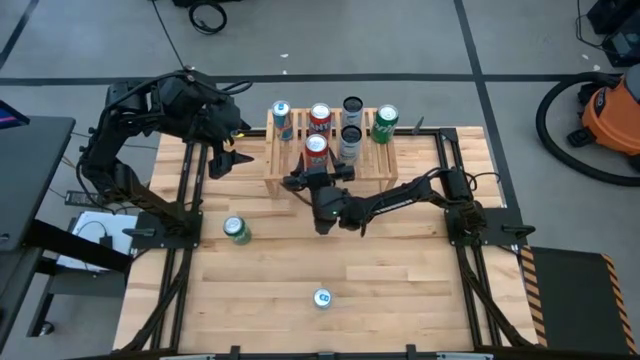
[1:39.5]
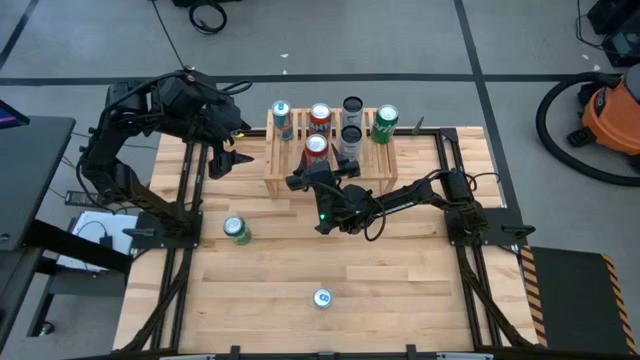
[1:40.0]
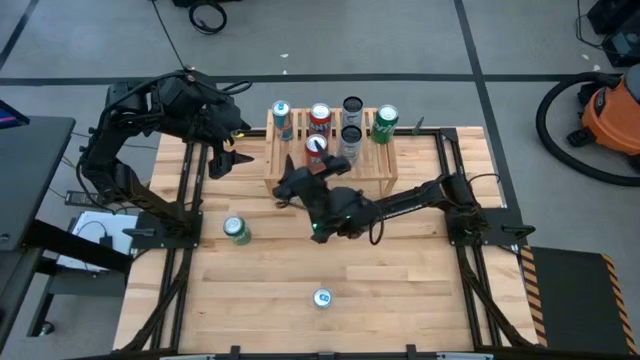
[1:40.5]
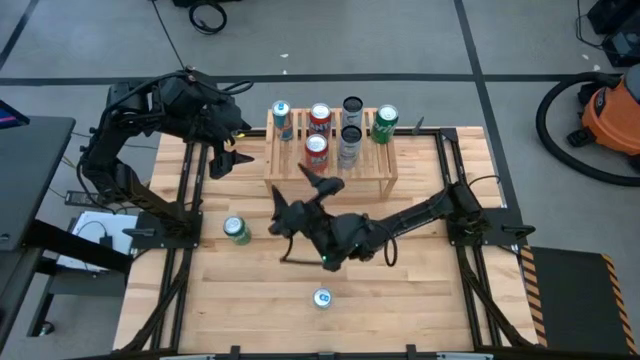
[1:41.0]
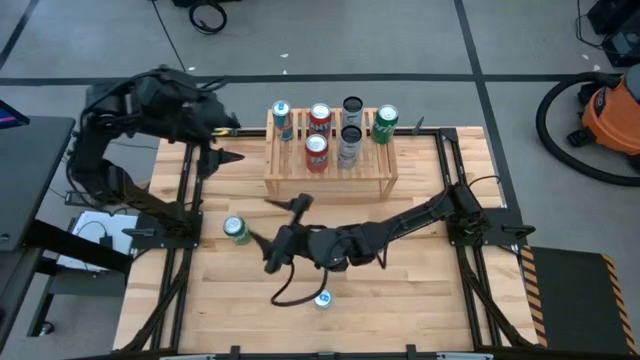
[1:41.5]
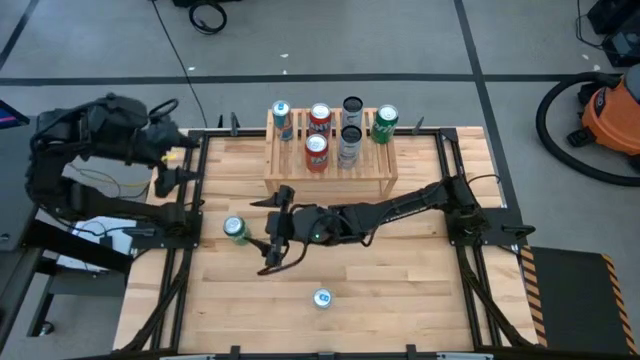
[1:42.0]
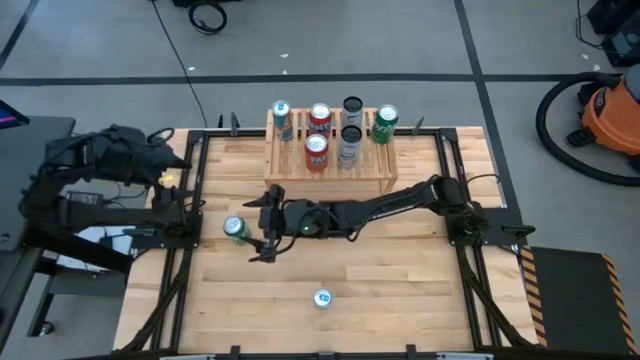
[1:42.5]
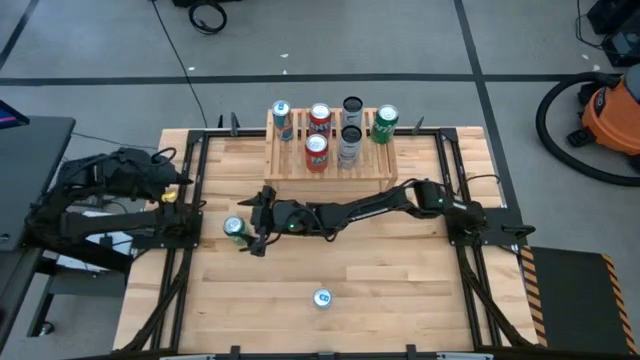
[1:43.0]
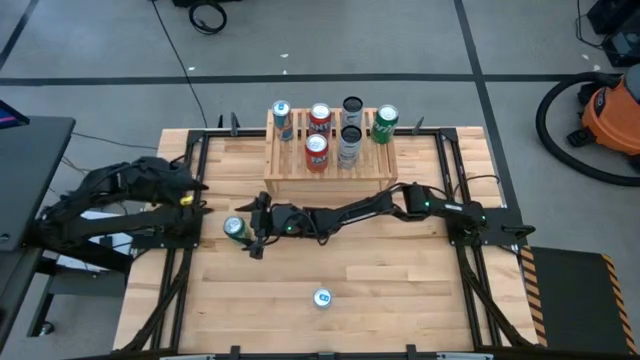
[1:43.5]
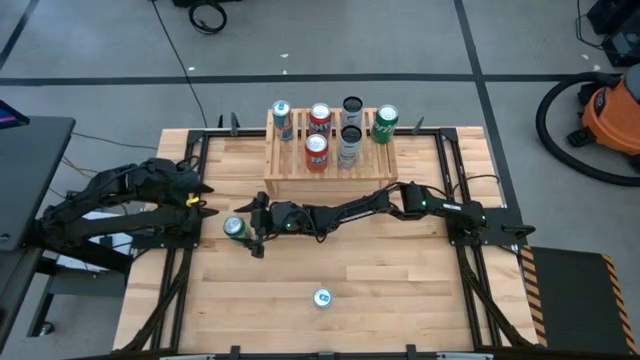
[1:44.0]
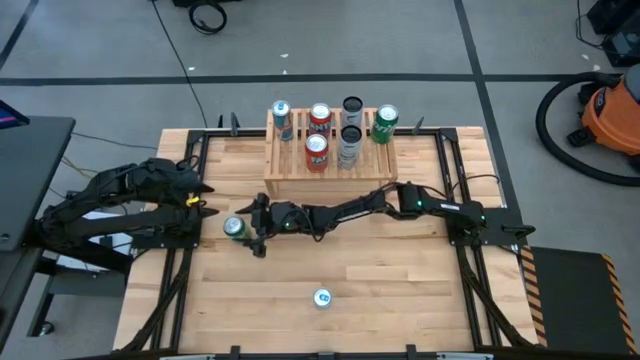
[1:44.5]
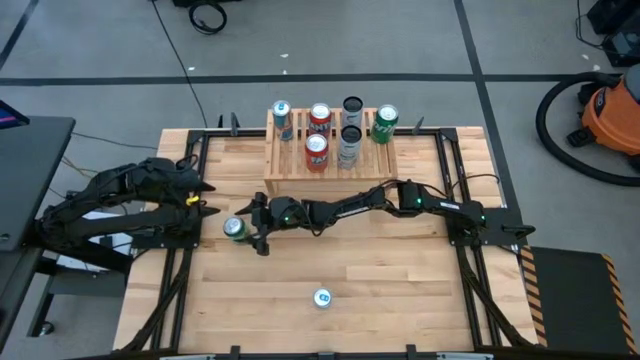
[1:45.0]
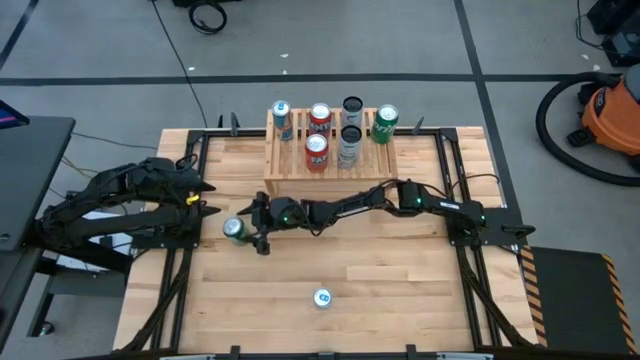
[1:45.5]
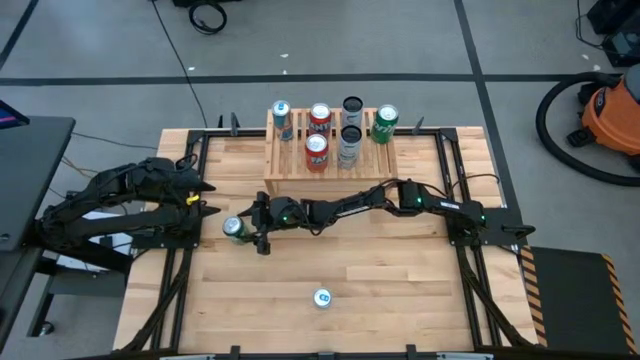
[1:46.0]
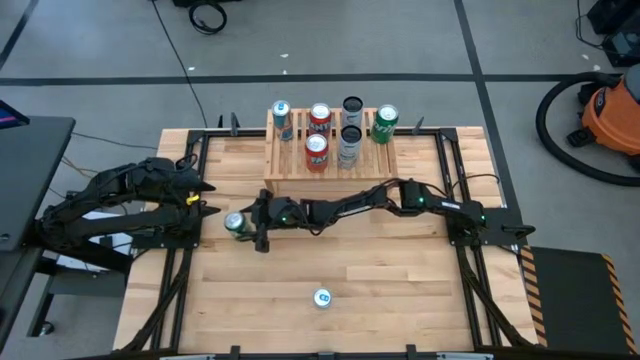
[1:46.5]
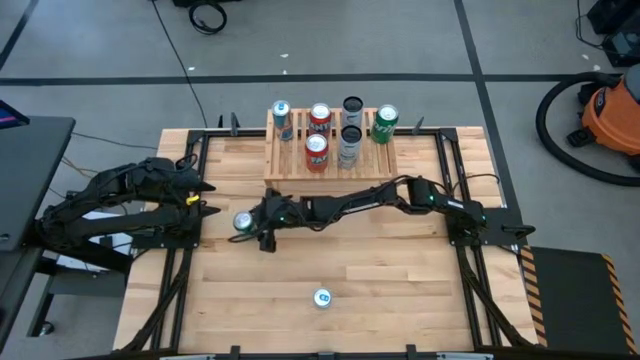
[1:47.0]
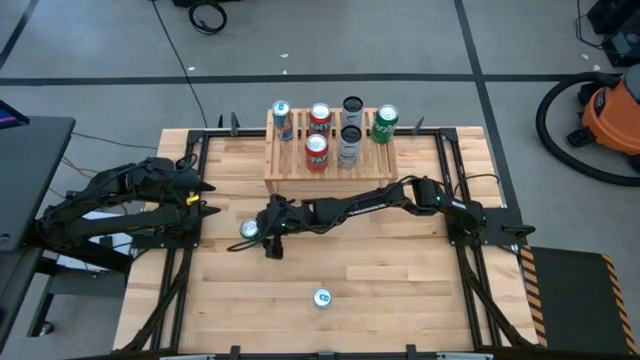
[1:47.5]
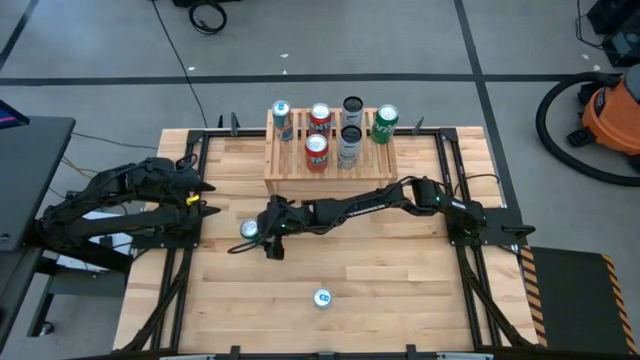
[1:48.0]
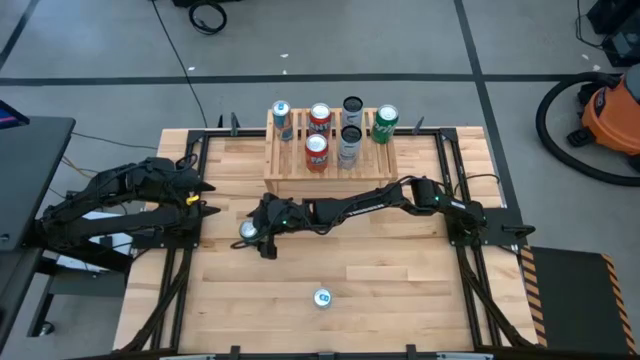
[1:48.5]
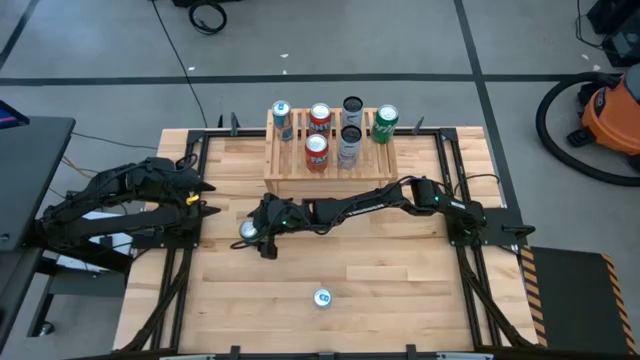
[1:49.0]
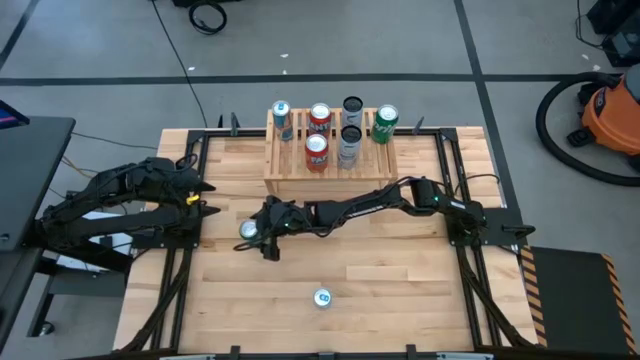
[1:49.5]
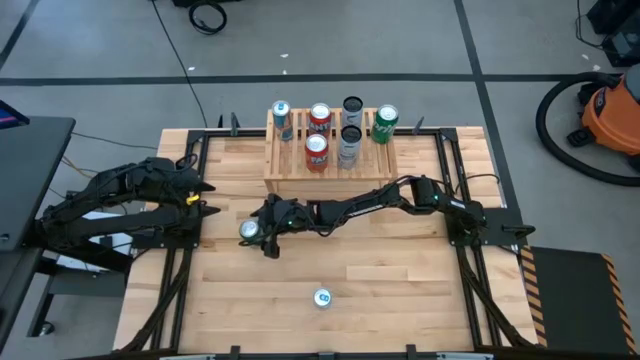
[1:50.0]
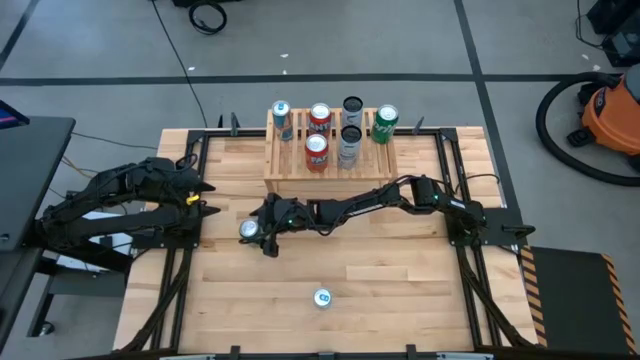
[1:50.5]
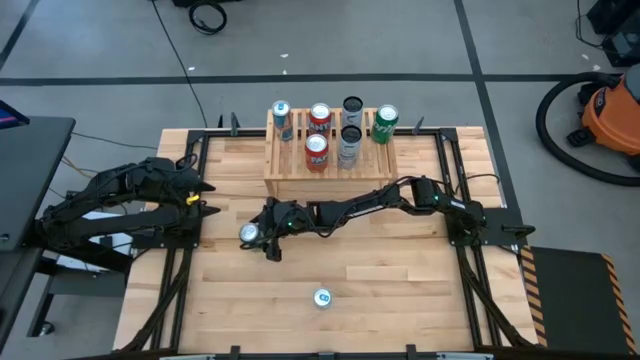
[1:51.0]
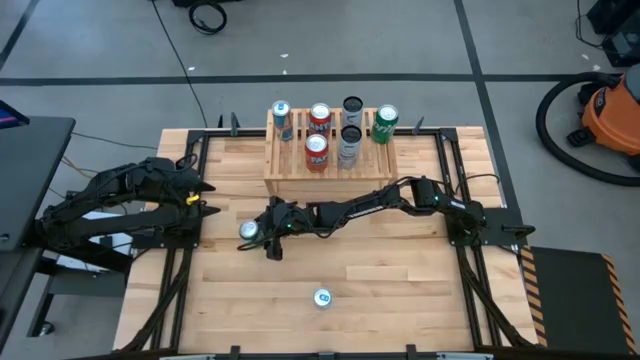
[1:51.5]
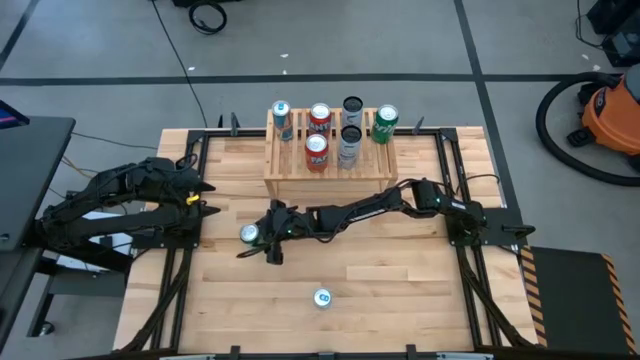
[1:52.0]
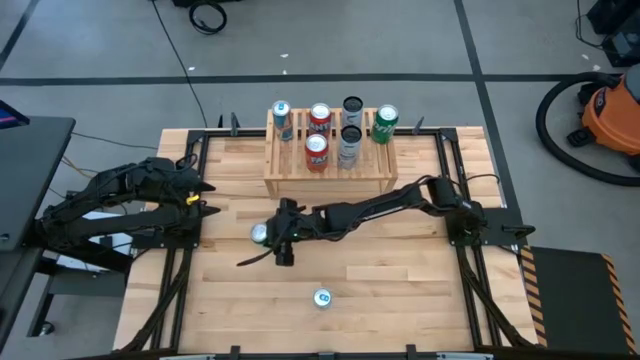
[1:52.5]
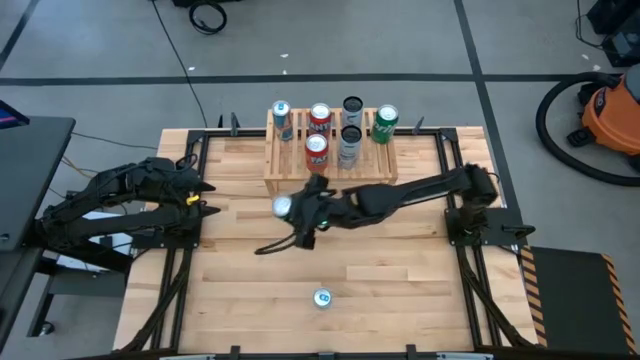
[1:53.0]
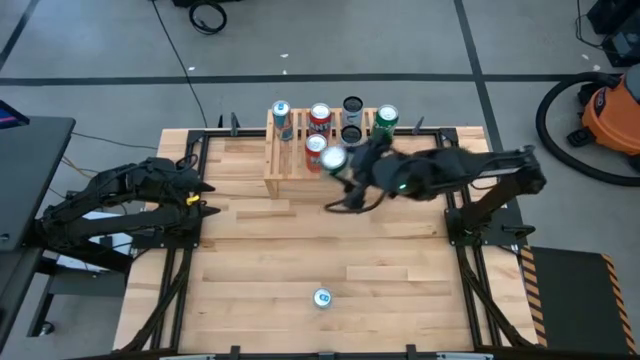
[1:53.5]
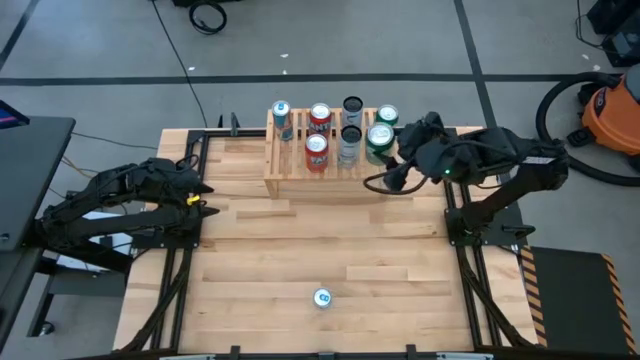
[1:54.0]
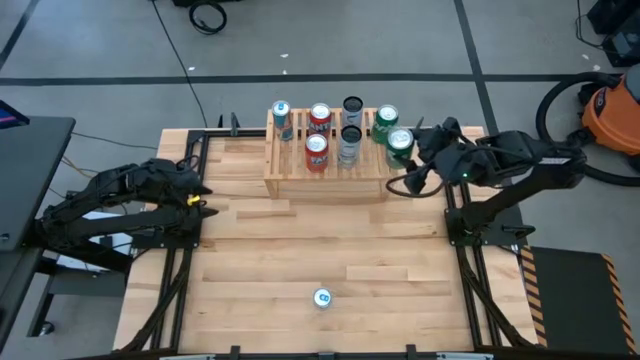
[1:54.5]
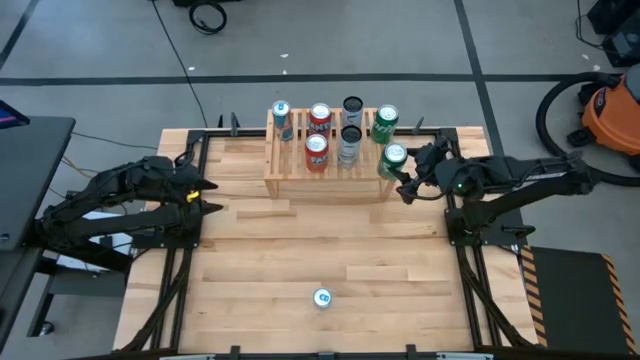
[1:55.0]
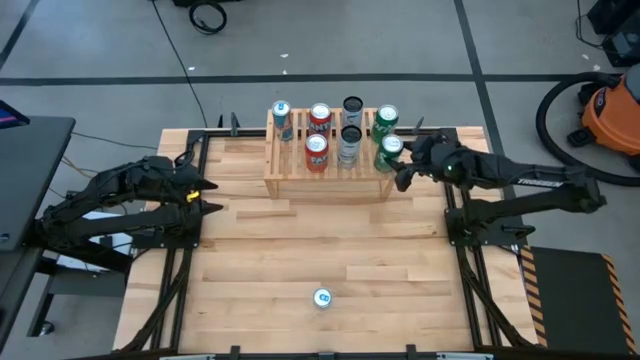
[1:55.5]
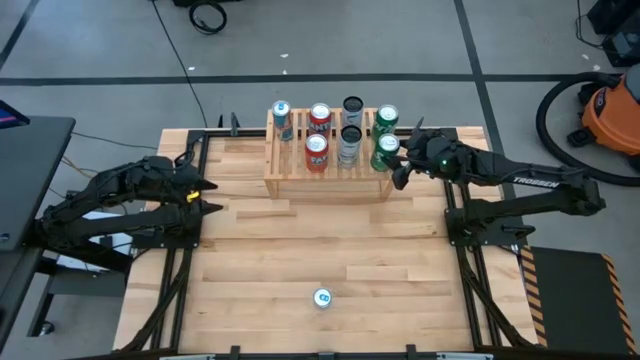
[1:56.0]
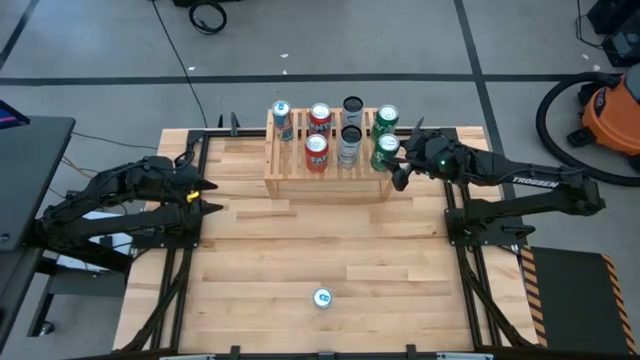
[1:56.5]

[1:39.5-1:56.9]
Task: Place canned beverage on shelf
Put the green soda can on the shelf aligned with the other green soda can

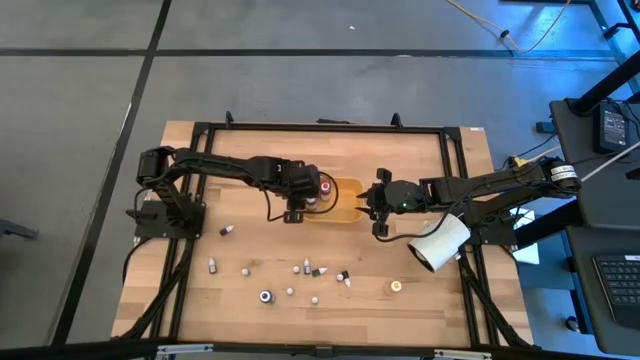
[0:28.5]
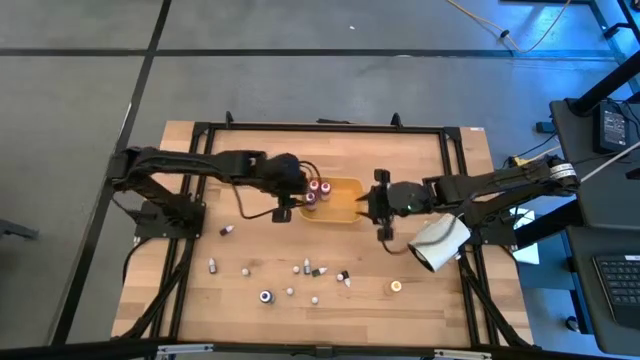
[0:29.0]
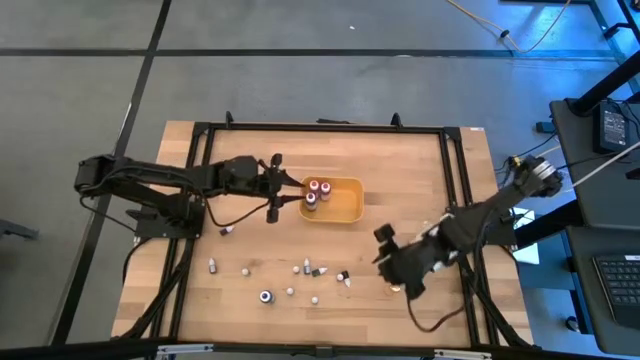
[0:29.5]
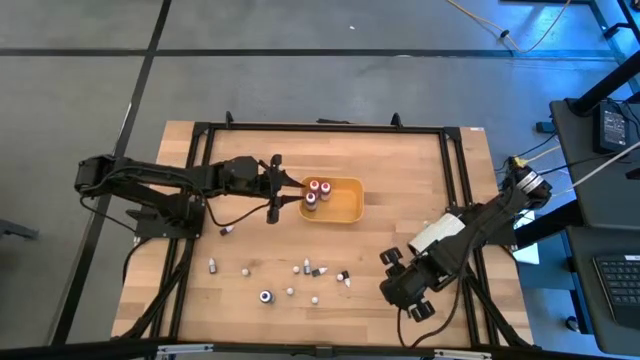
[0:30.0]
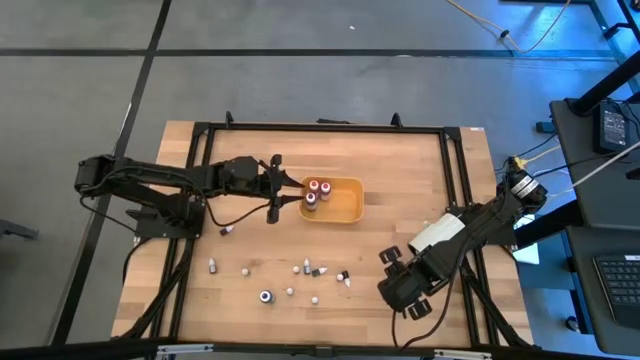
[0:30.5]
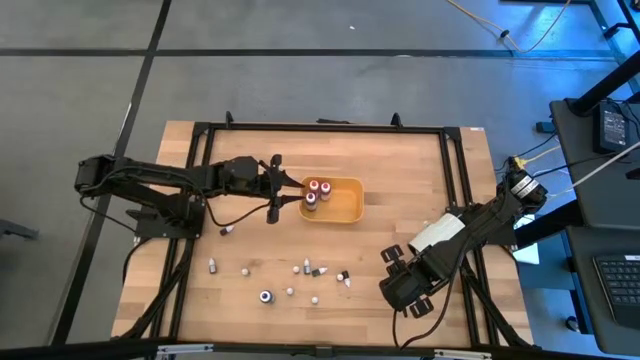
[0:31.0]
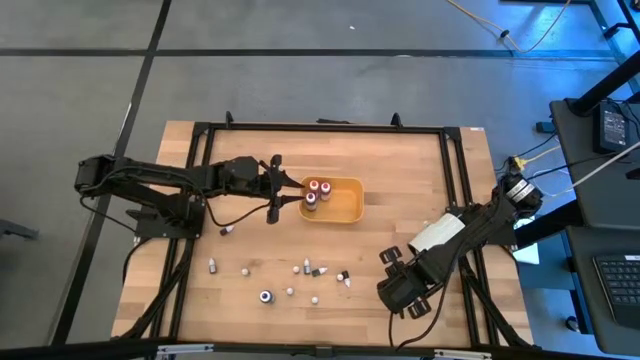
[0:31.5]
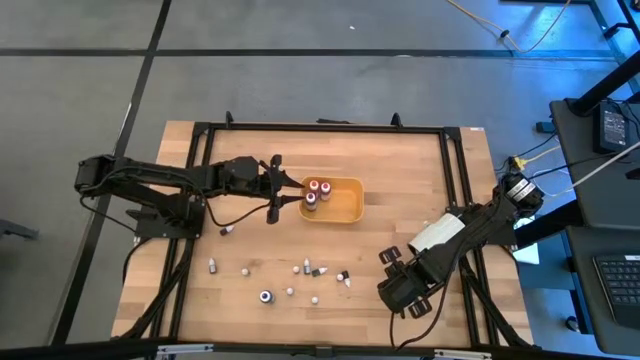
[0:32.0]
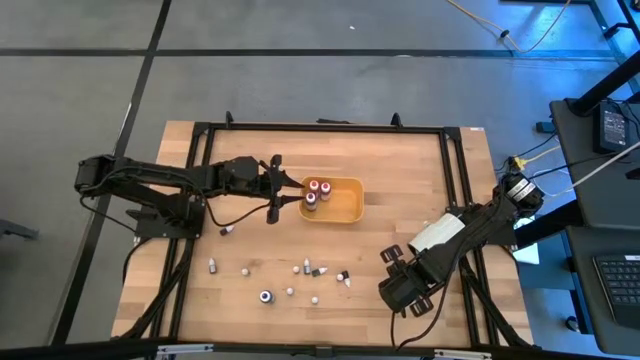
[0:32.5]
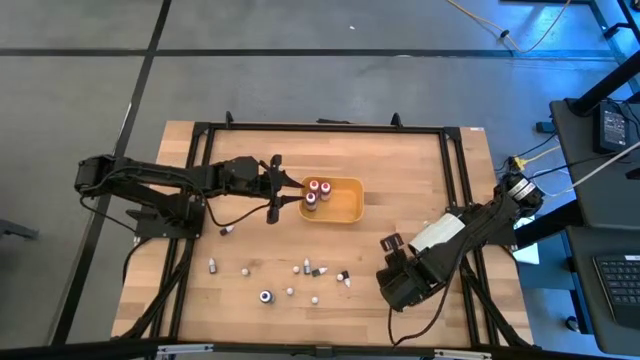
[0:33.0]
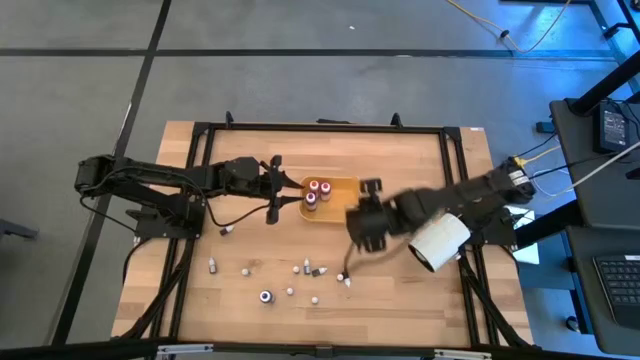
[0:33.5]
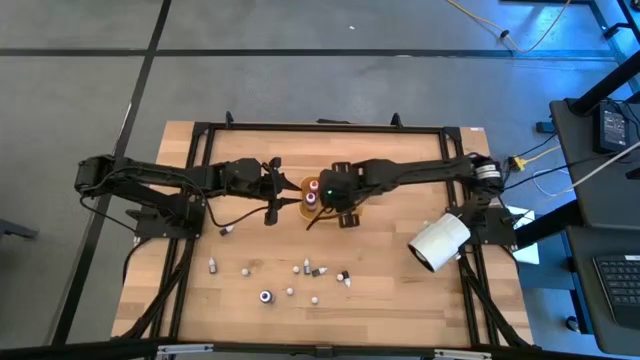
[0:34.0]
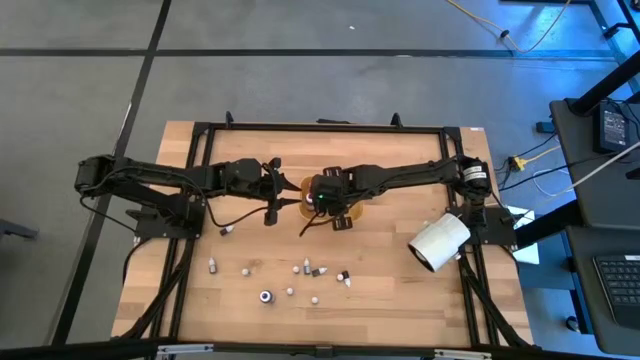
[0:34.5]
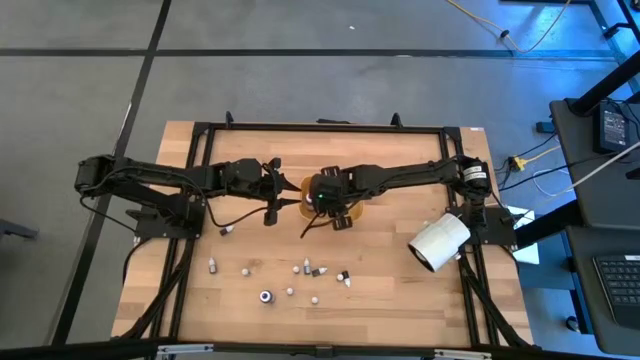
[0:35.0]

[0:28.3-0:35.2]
Task: Pick & Place food coloring
Put the big yellow food coloring bottle into the yellow bin
